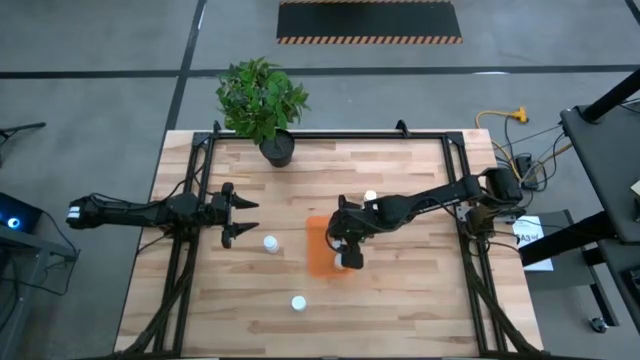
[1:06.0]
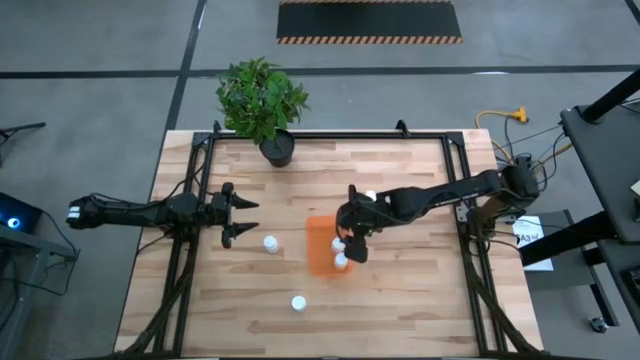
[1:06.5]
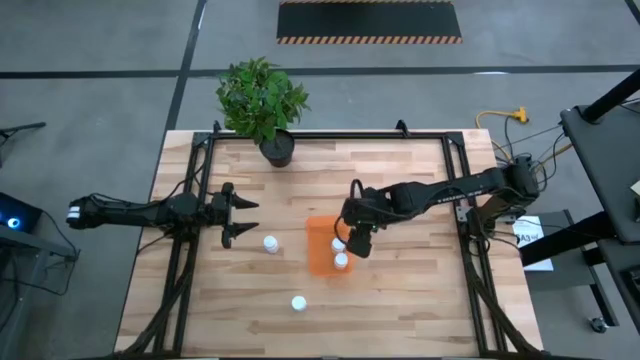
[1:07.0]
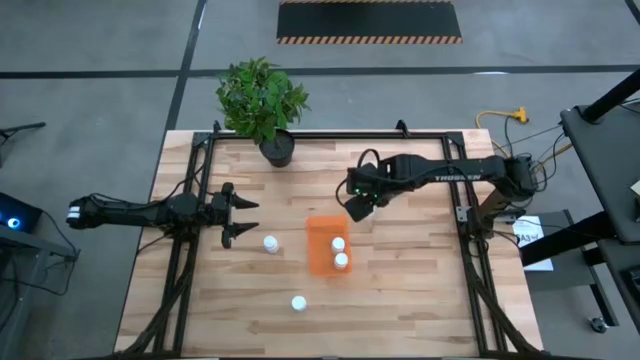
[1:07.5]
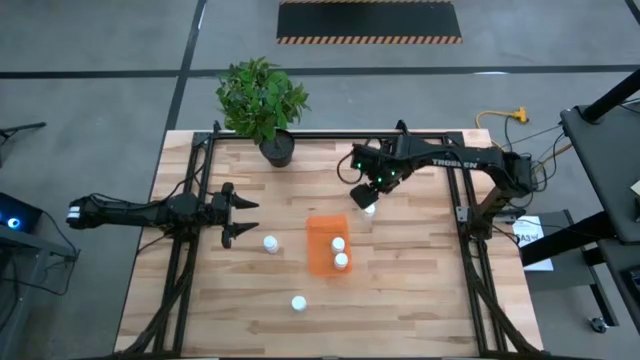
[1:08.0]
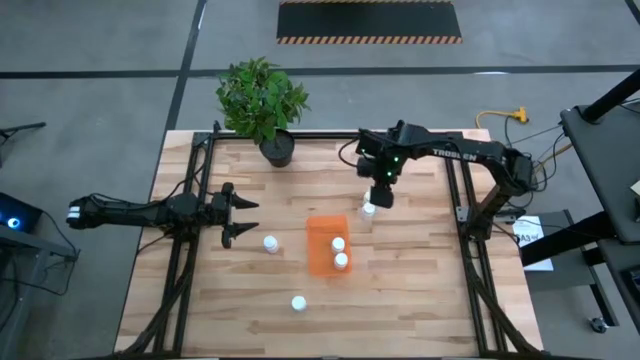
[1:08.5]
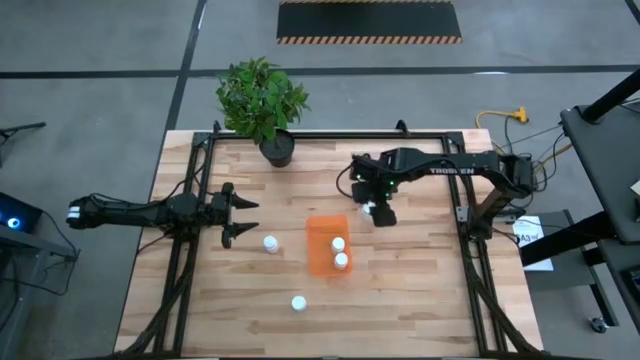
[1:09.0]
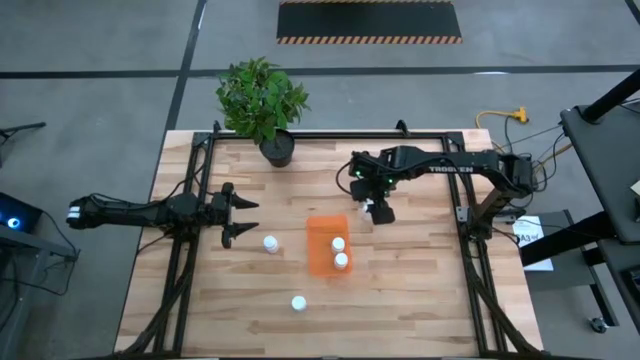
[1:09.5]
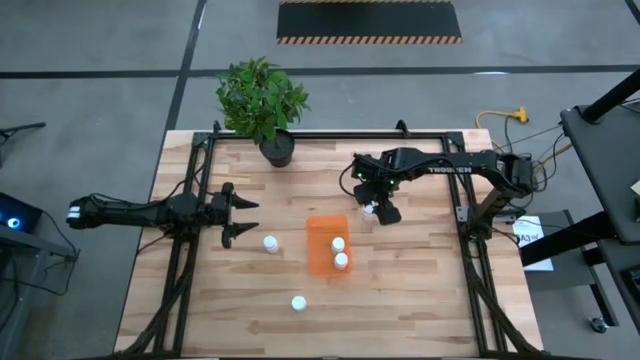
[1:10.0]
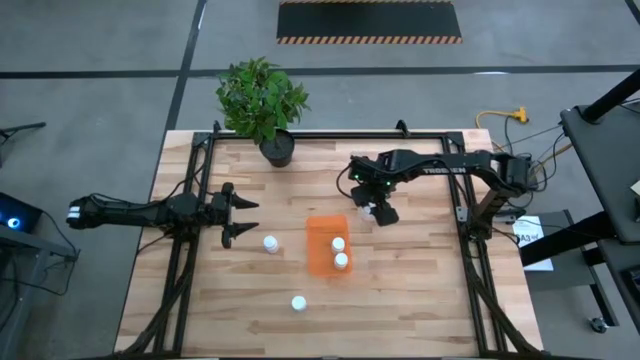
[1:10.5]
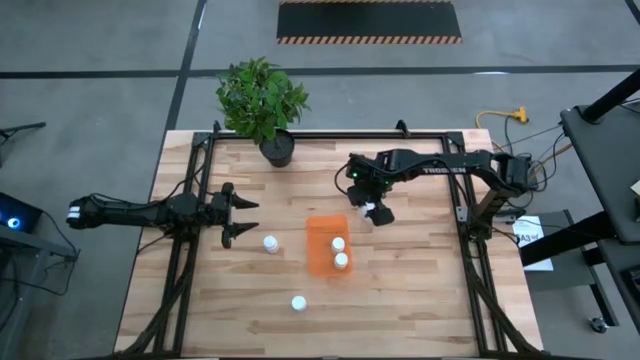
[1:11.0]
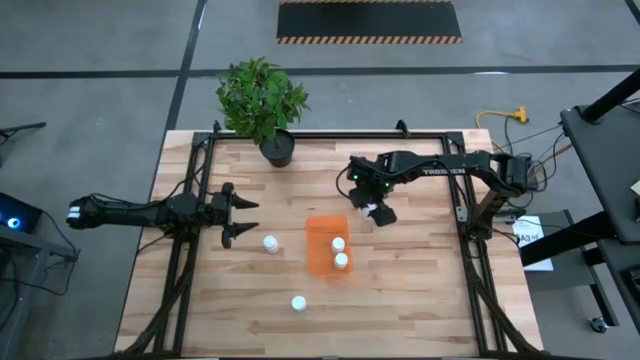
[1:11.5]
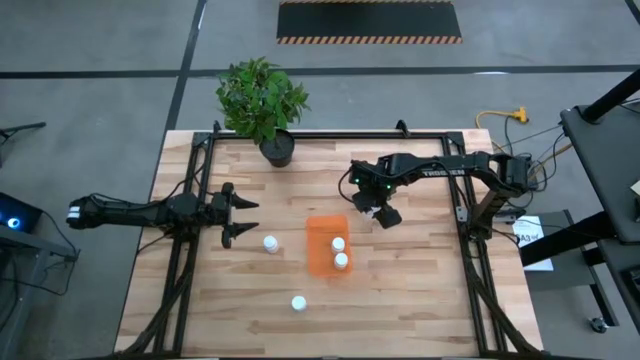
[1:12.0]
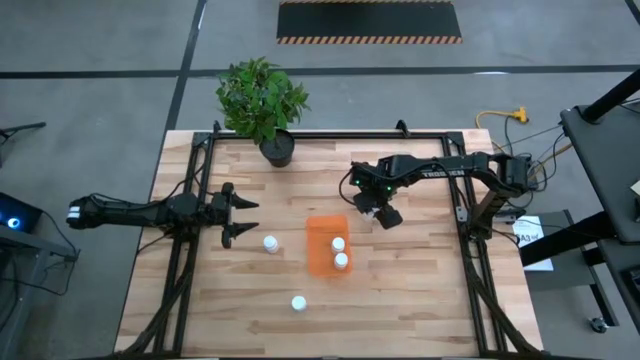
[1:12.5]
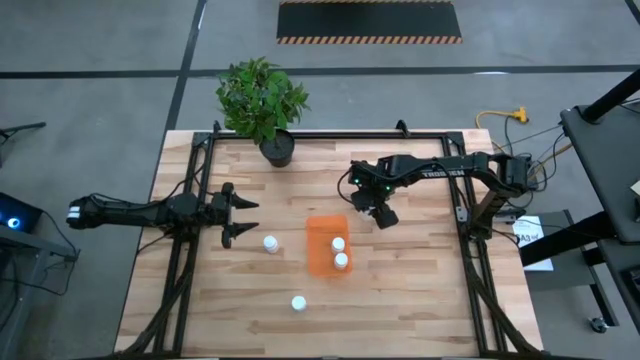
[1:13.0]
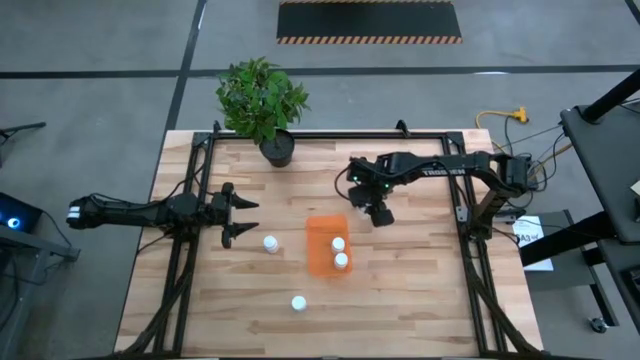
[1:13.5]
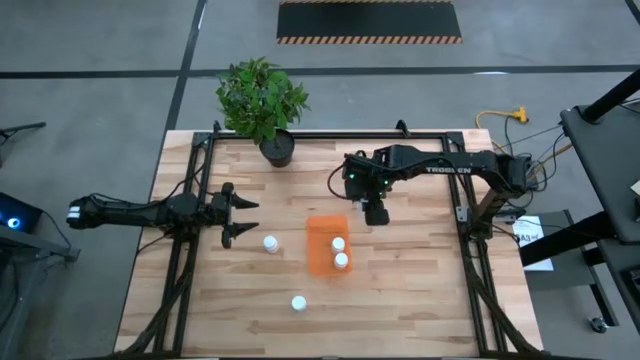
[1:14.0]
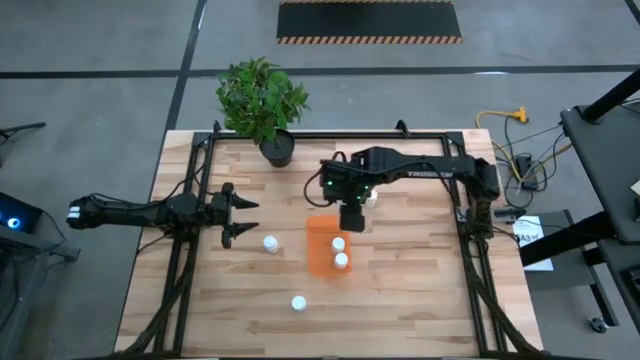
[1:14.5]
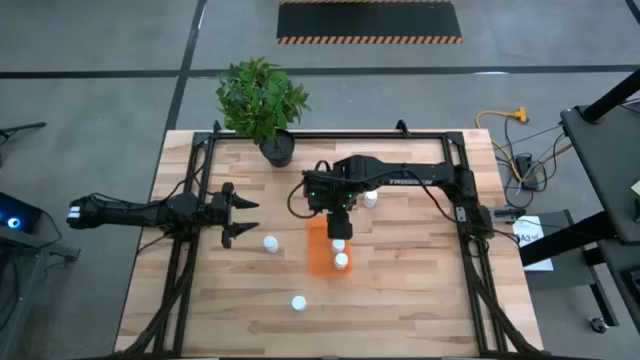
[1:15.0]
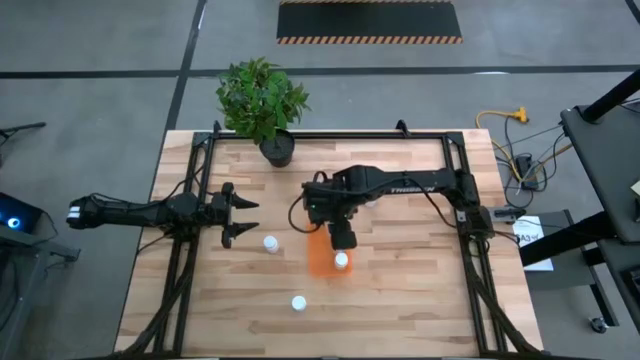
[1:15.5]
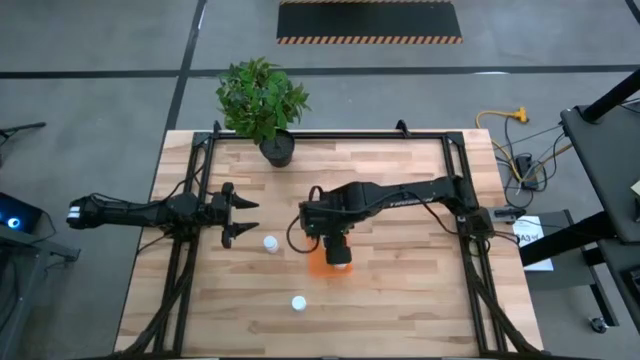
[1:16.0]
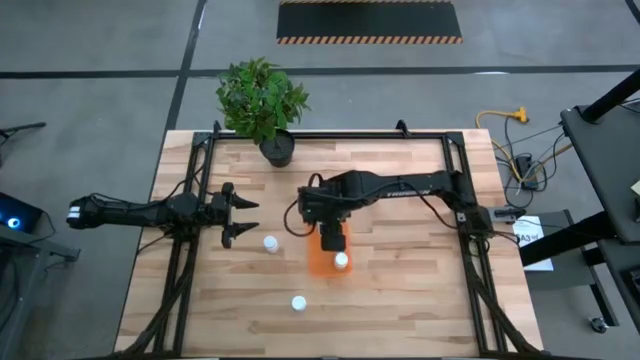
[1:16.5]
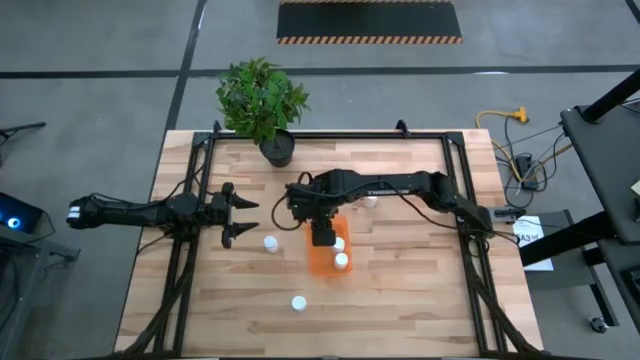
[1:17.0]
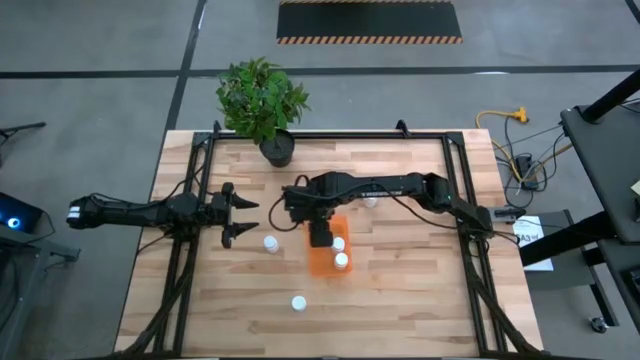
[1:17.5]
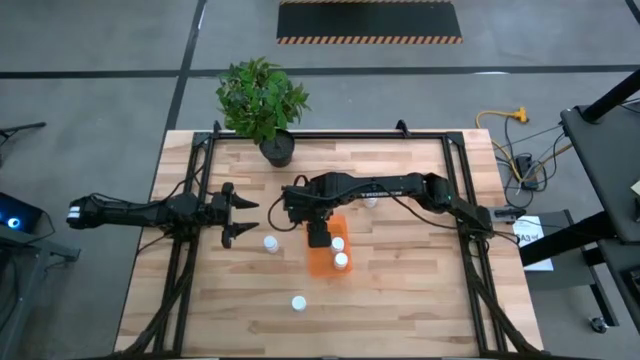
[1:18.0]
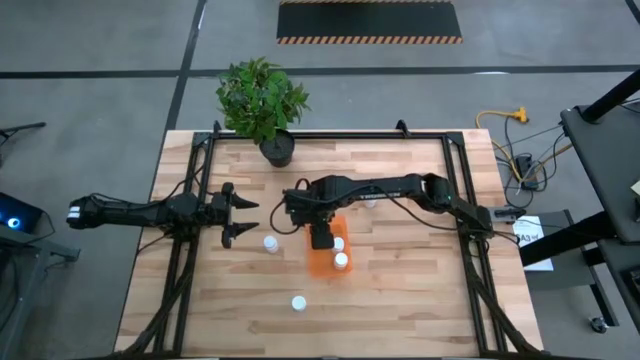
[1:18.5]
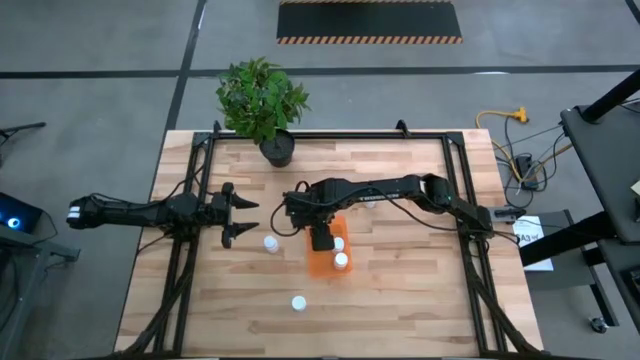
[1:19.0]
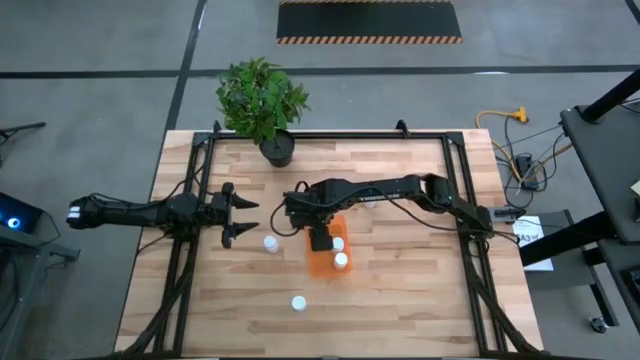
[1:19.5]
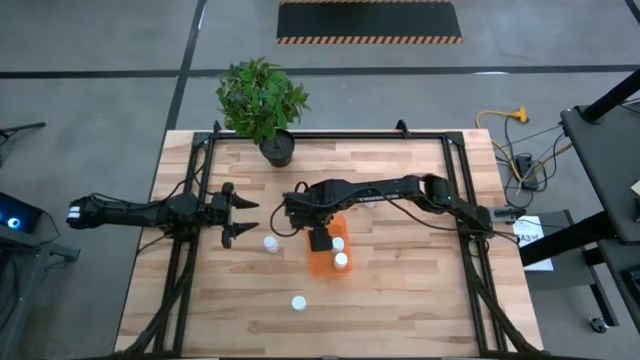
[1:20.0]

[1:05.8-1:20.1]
Task: Pick and place pill bottles into a basket
Put the white pill bottle into the orange container

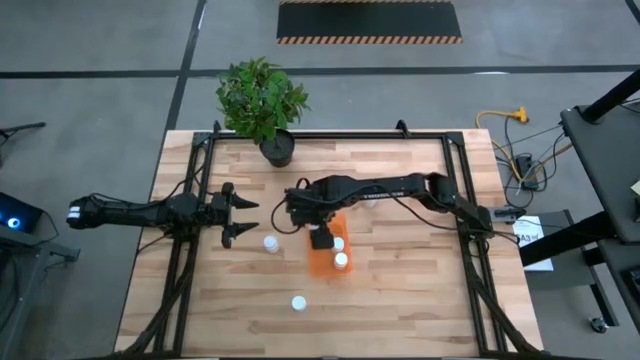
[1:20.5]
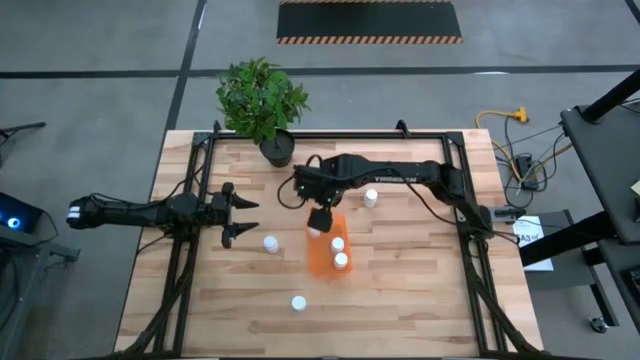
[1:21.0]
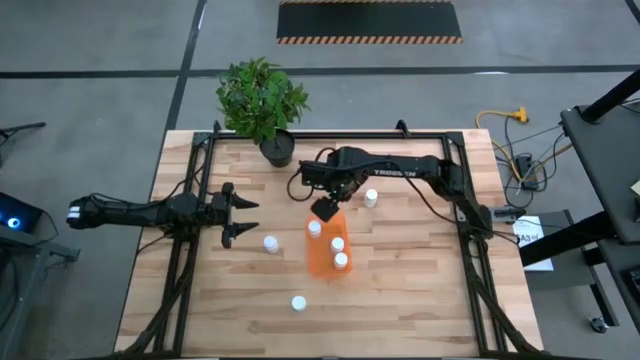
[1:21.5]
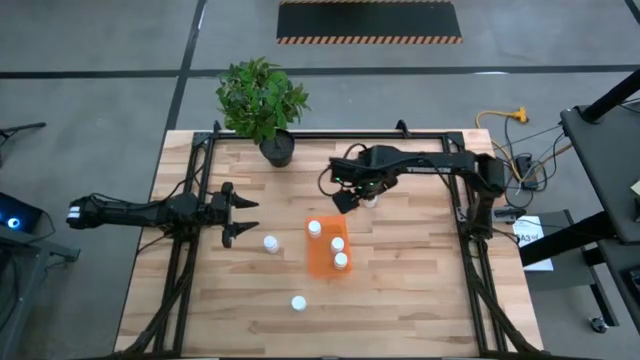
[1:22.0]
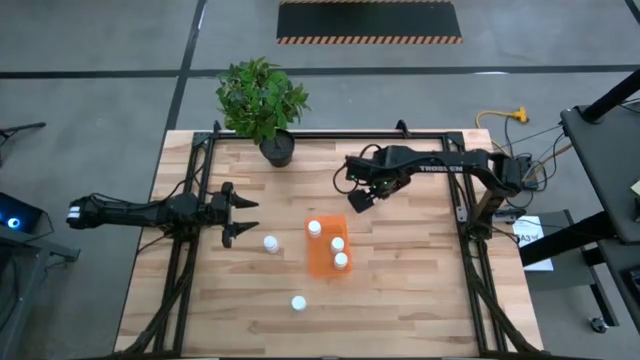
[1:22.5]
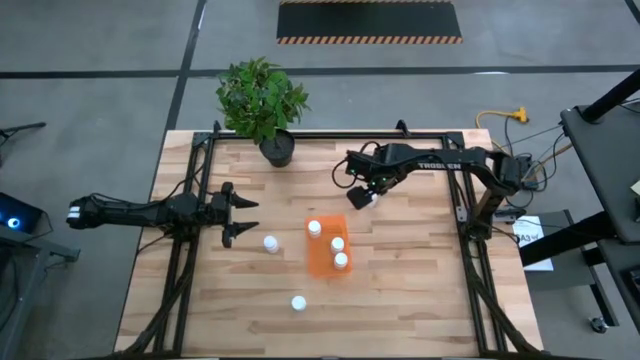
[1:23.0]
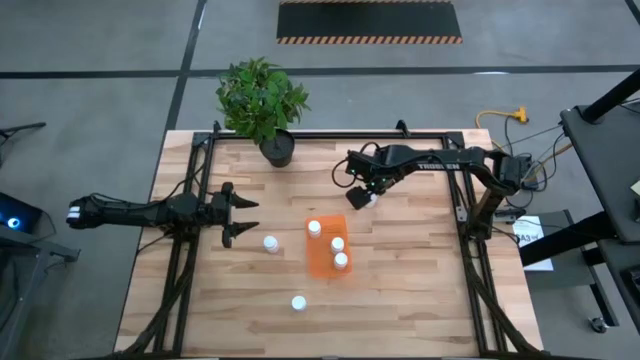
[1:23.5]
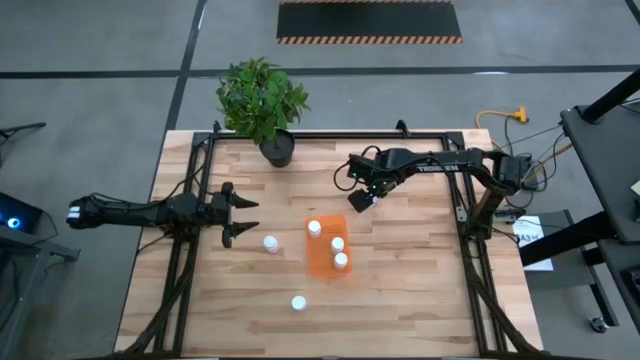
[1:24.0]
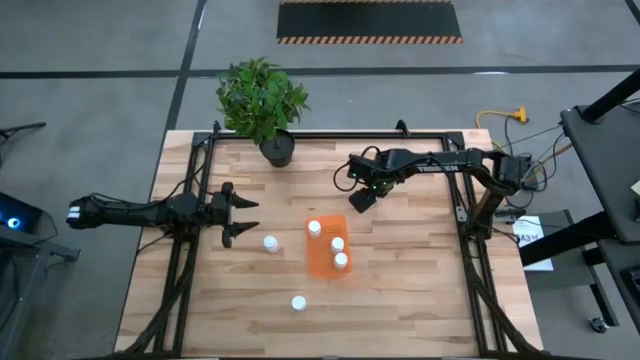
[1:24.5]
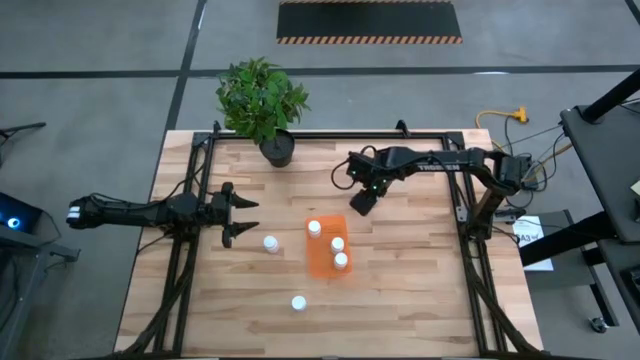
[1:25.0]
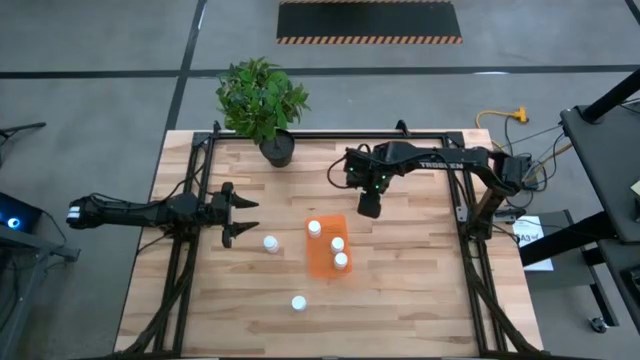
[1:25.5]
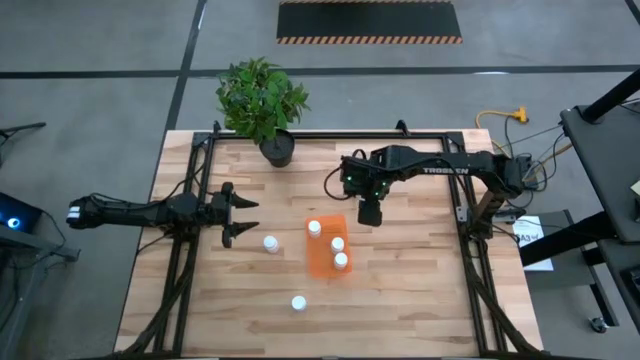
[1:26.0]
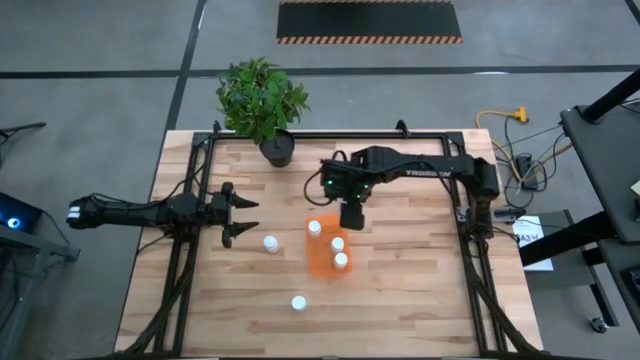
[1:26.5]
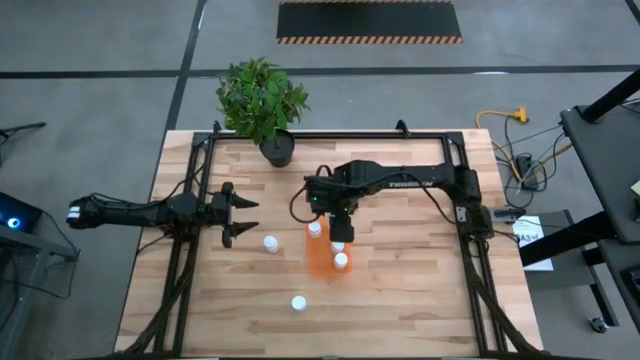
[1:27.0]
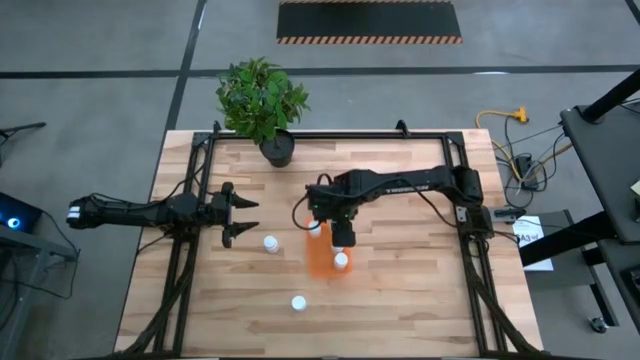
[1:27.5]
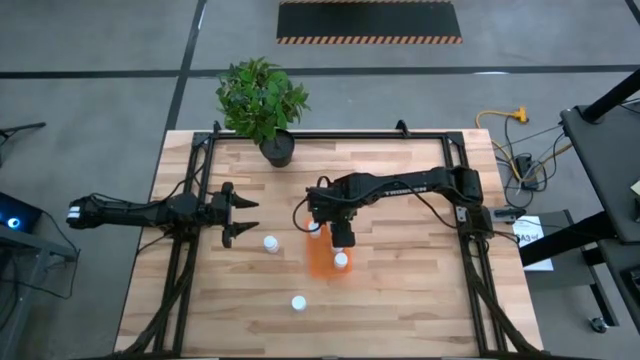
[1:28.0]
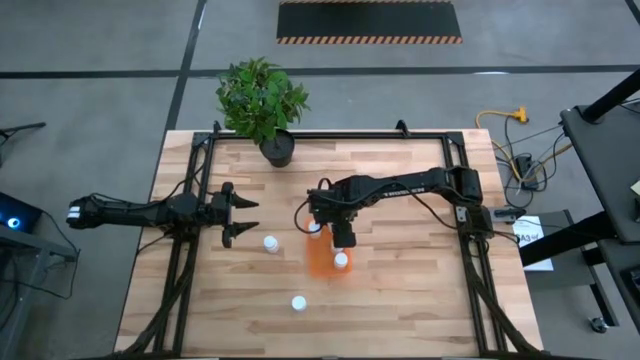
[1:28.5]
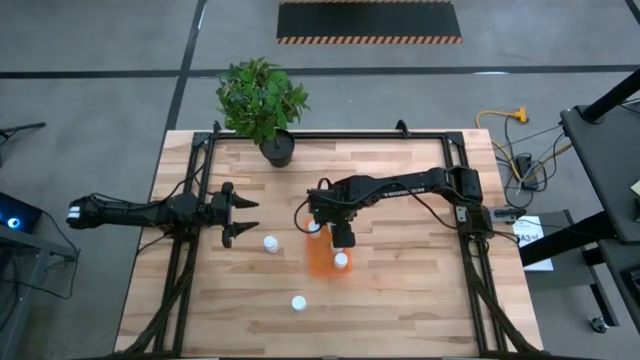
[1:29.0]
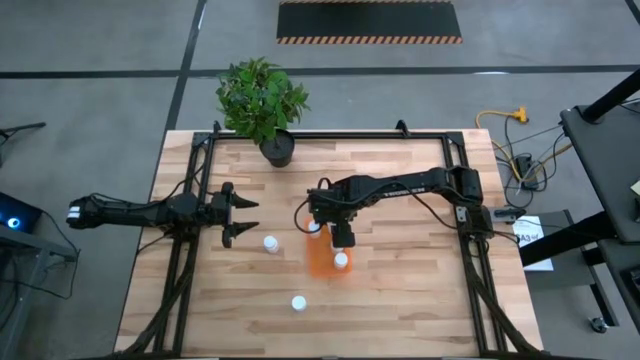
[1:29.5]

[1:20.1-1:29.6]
Put the white pill bottle into the orange container
